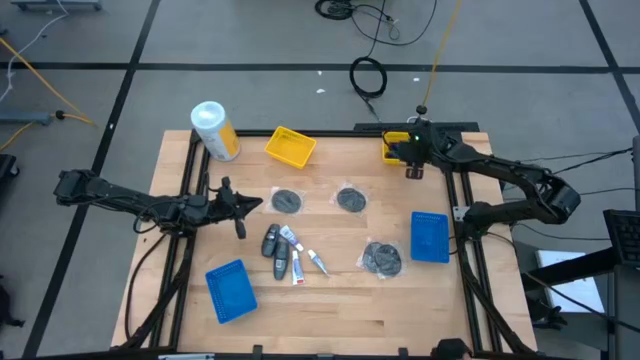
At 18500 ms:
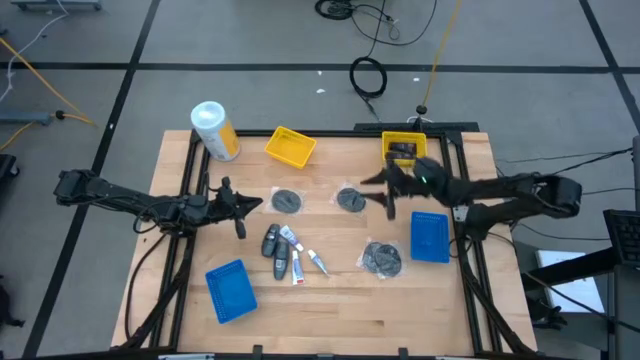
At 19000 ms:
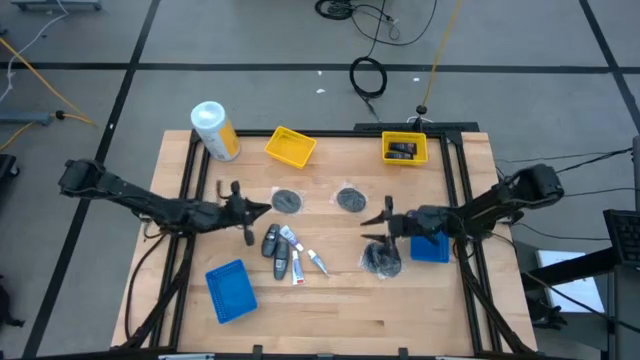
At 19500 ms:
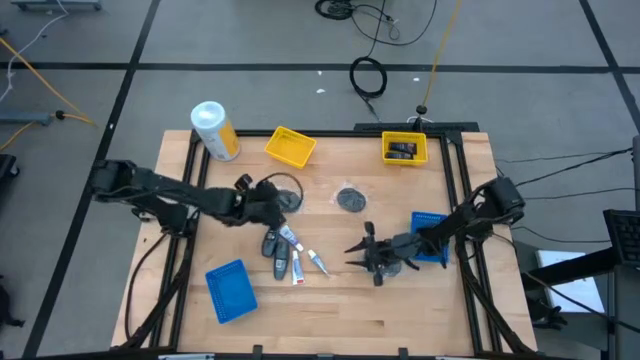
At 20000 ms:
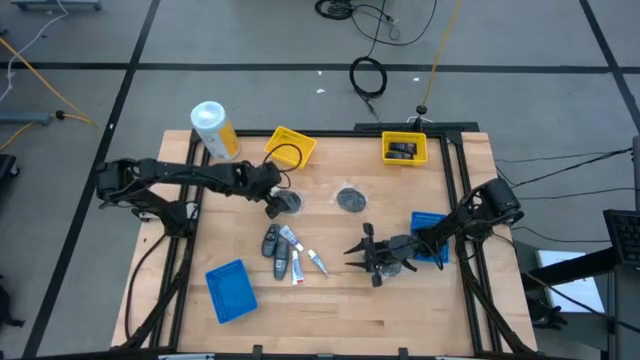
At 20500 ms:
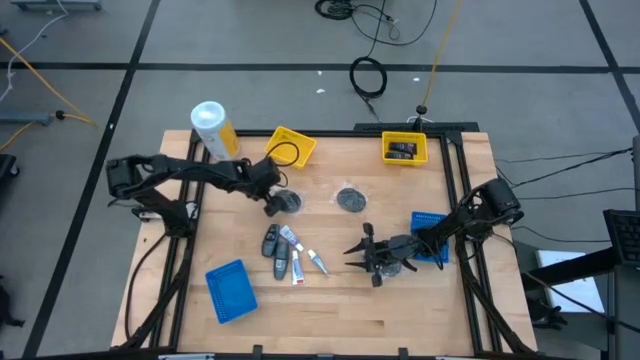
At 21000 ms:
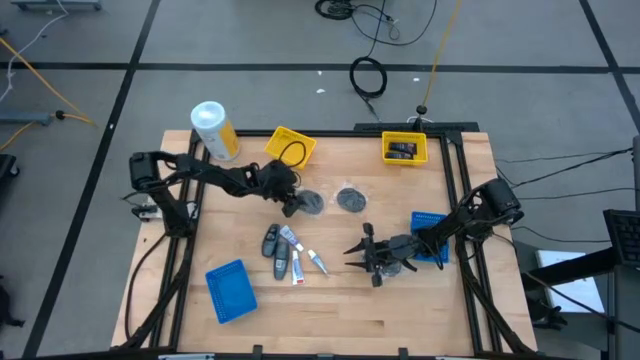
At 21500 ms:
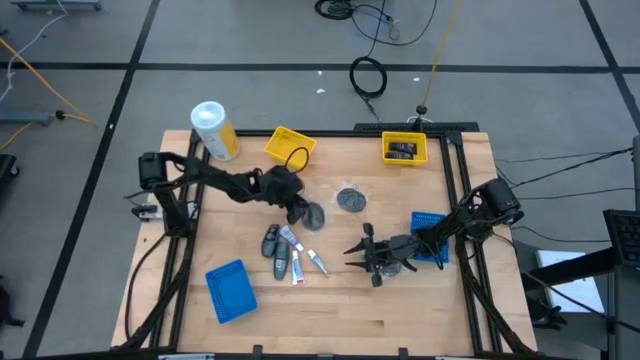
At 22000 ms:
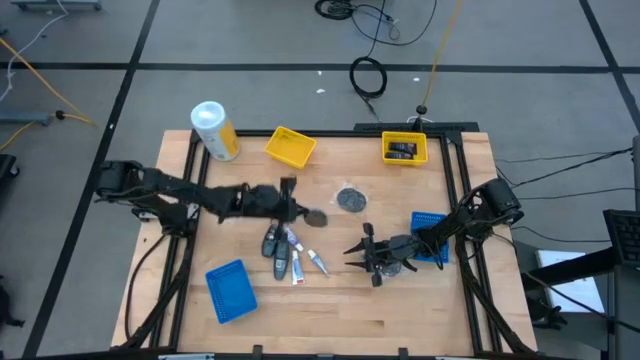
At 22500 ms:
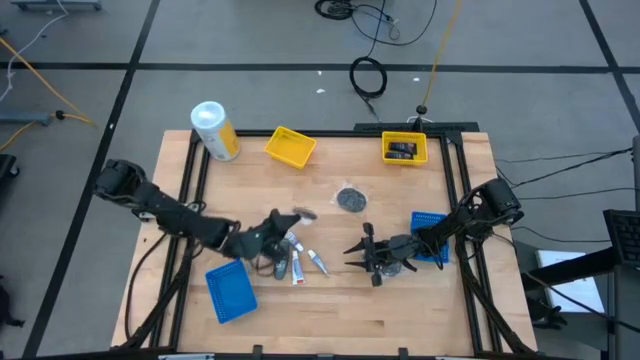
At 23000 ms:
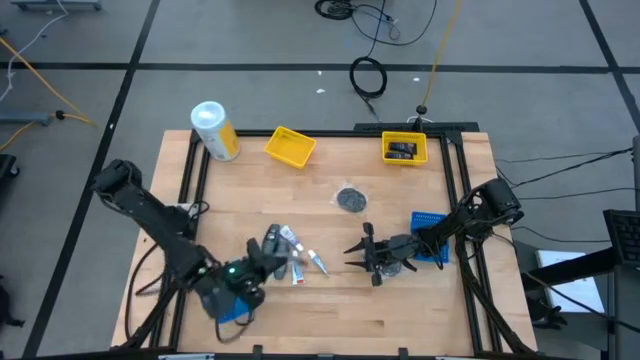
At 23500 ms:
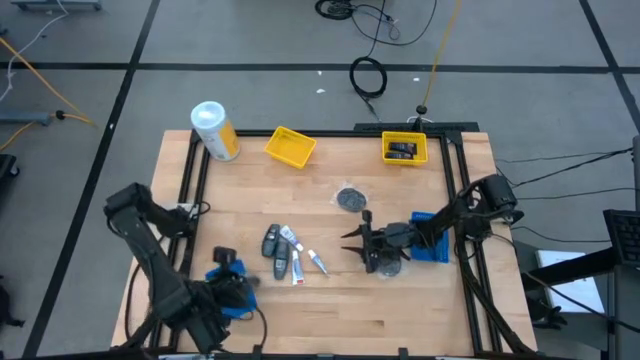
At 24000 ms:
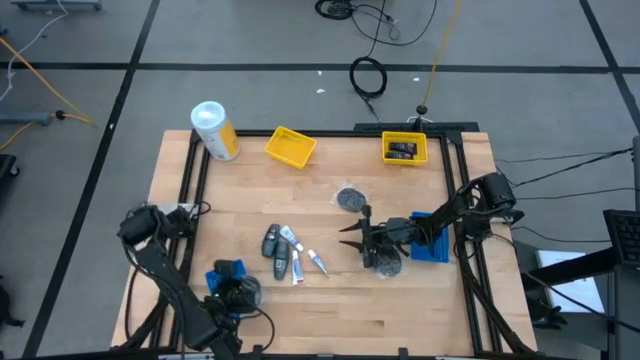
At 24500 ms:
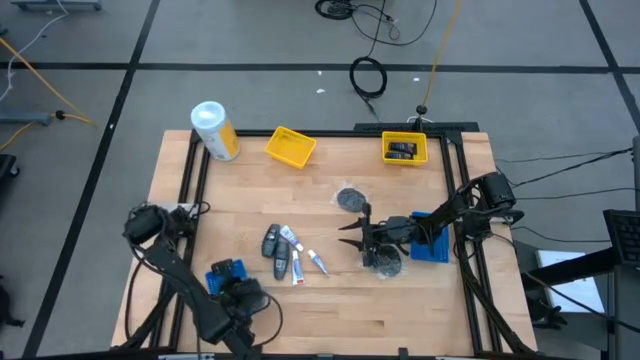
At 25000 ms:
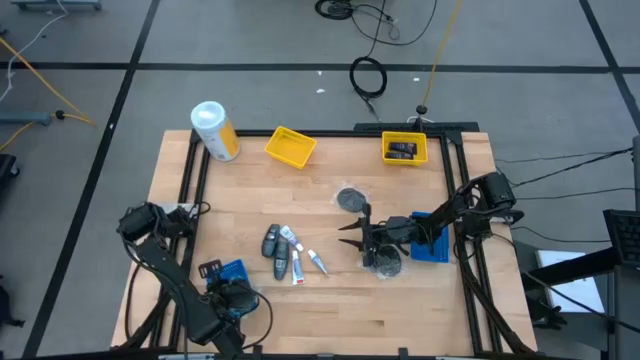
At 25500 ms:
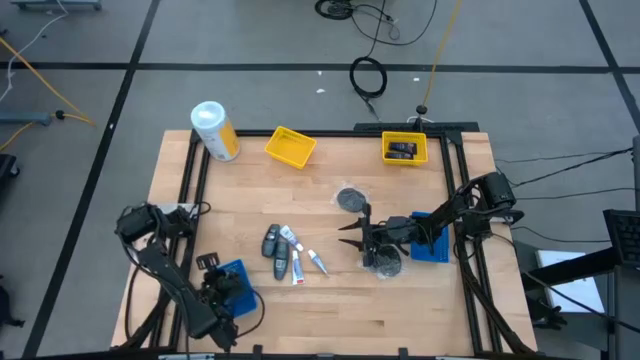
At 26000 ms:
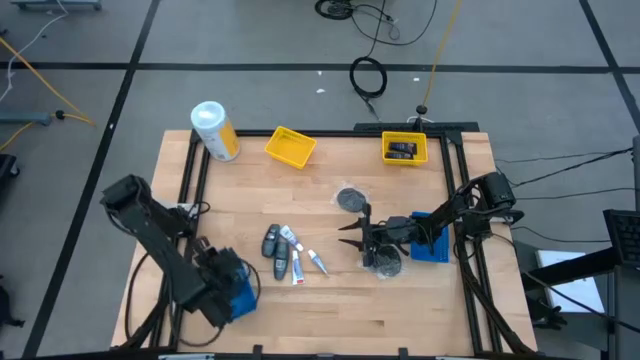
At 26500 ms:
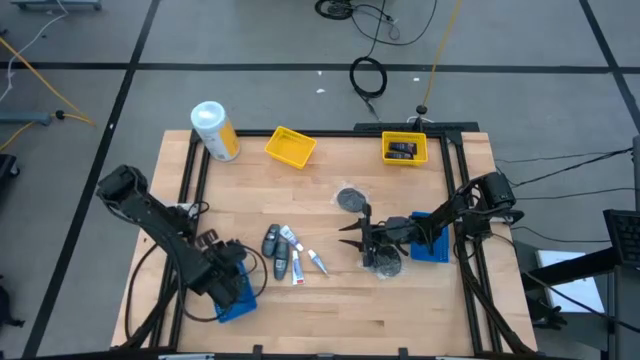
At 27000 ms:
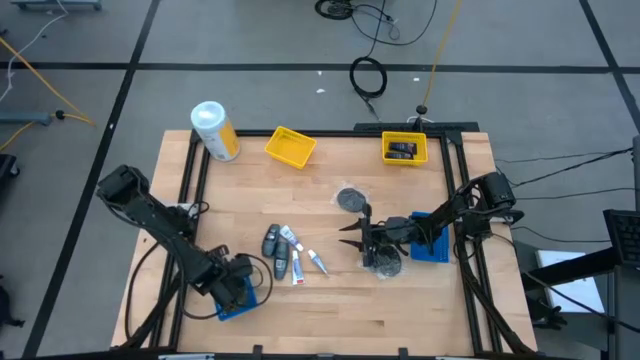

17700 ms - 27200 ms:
Task: Pick & Place Travel size toiletries
Put the black hairbrush into the left blue bin

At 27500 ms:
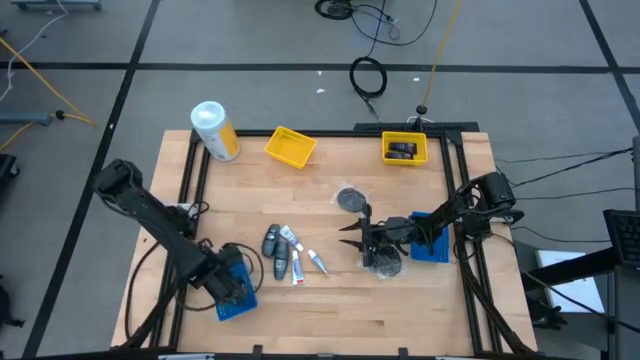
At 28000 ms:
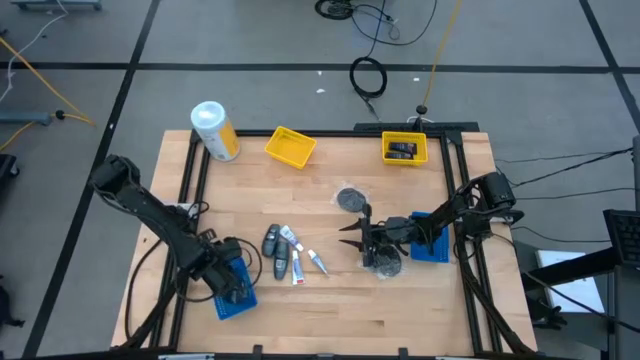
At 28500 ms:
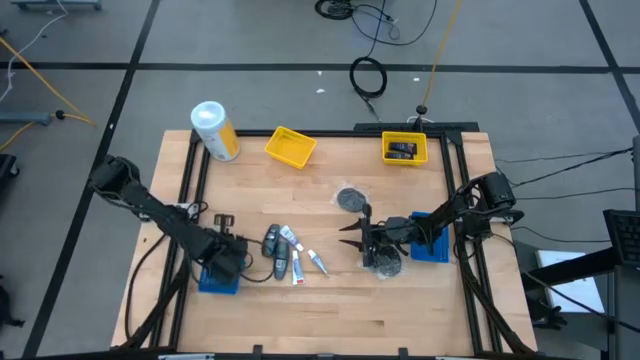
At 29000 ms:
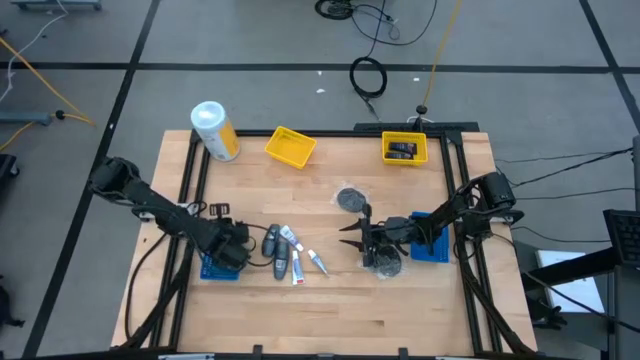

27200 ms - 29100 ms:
Adjust the left blue bin

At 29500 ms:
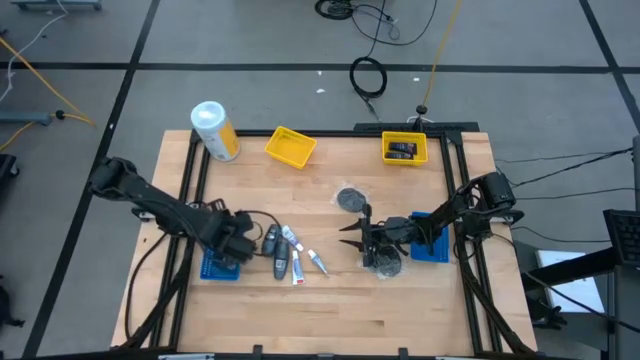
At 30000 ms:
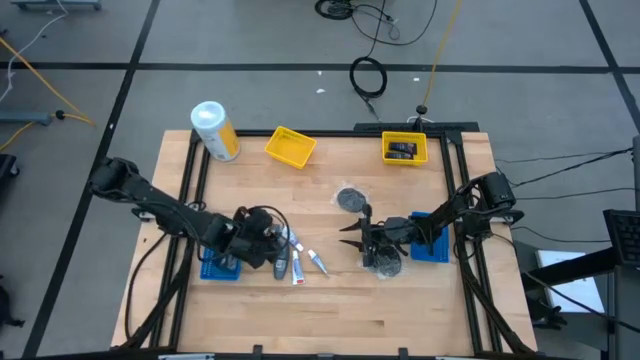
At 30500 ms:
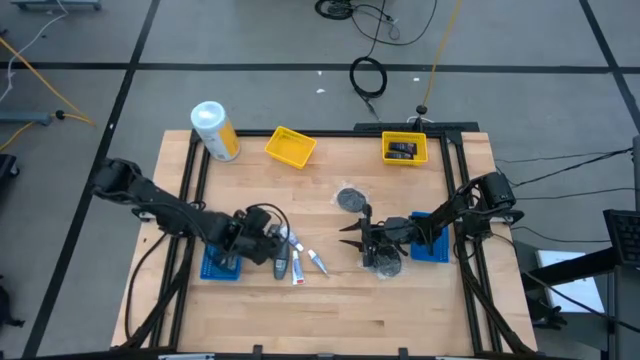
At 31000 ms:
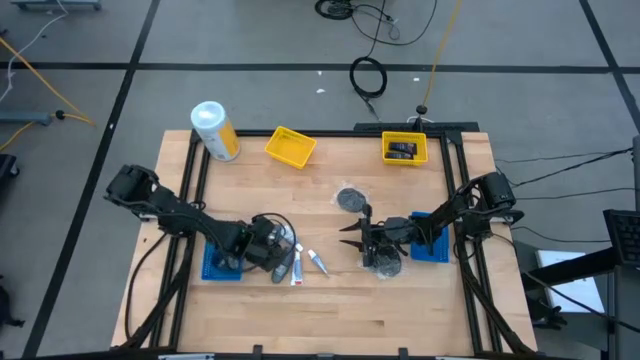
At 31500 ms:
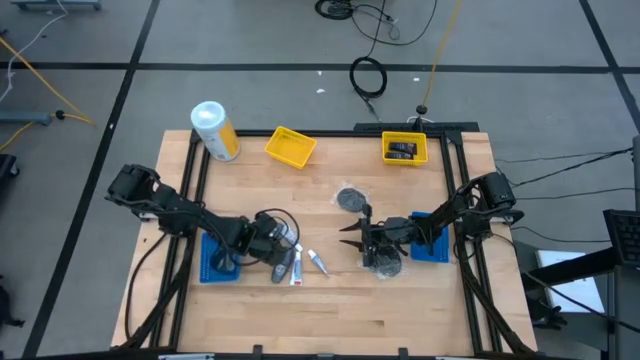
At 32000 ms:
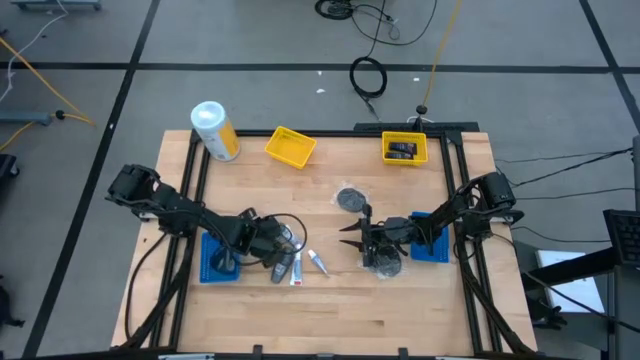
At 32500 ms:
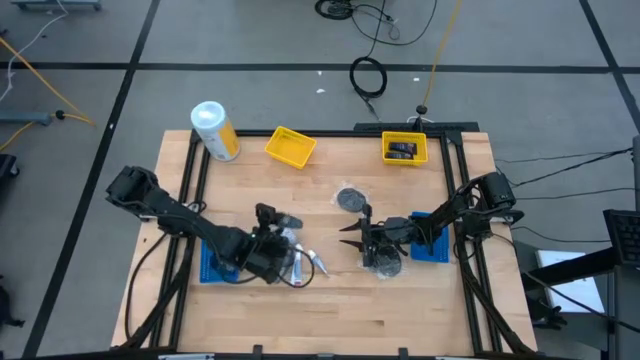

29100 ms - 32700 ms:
Put the gray deodorant into the left yellow bin

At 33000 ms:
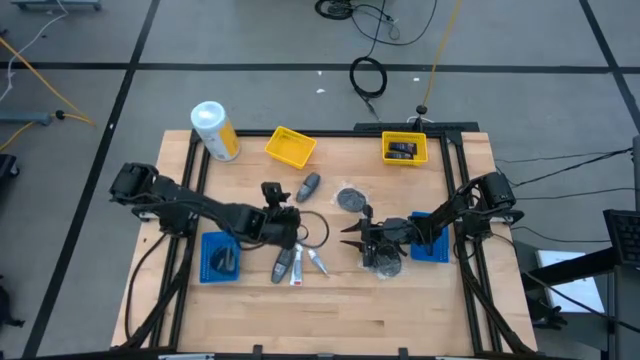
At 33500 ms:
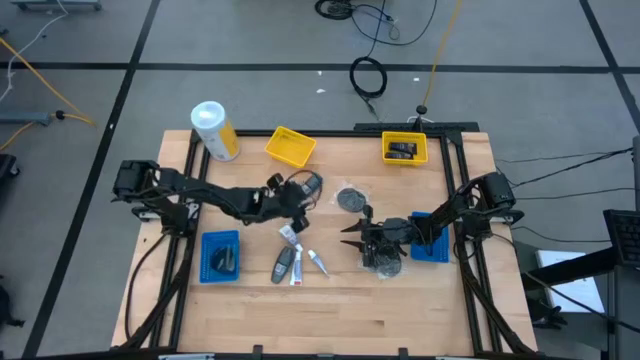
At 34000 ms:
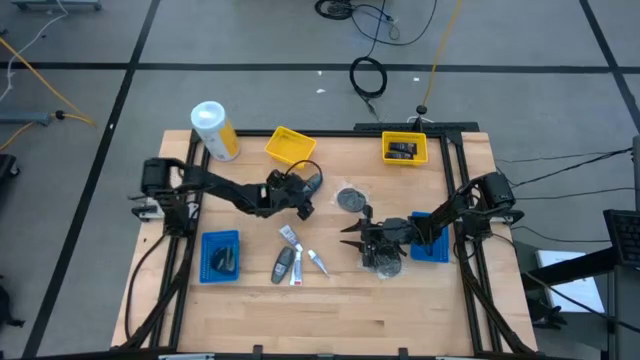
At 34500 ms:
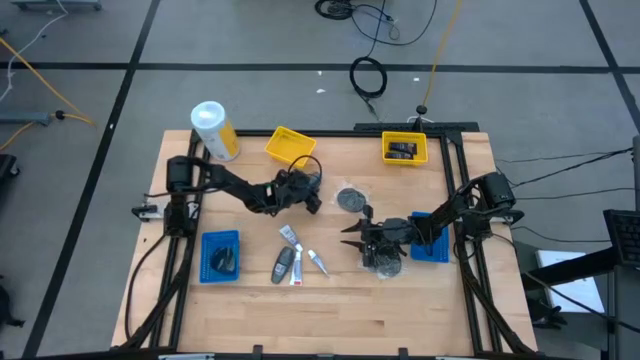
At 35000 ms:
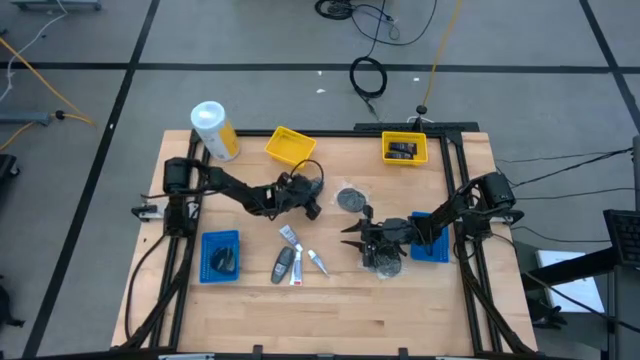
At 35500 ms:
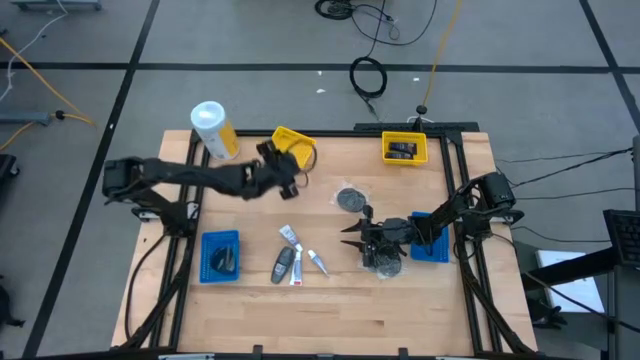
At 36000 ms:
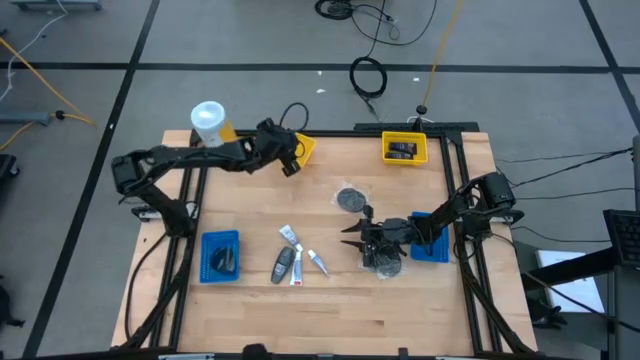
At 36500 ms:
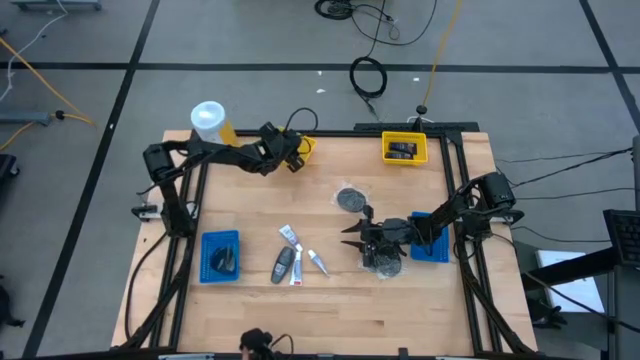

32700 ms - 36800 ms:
Put the gray deodorant into the left yellow bin

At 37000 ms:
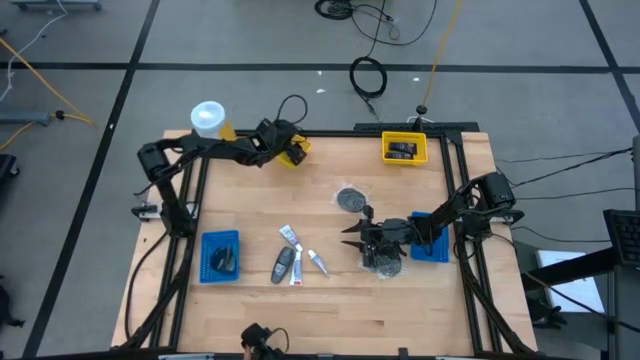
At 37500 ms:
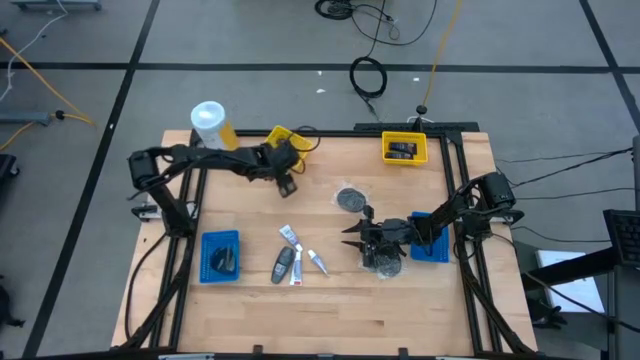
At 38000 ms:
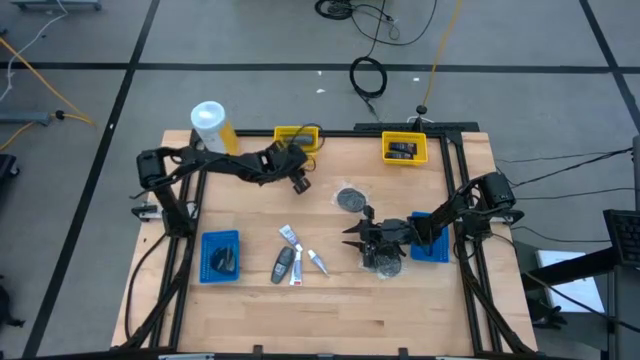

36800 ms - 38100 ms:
Adjust the left yellow bin

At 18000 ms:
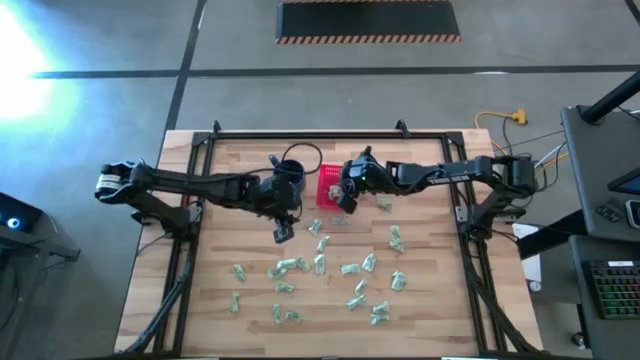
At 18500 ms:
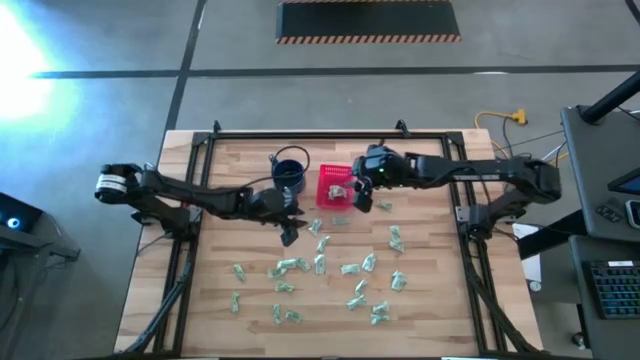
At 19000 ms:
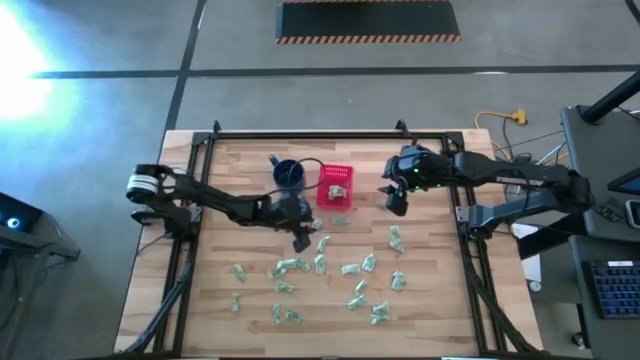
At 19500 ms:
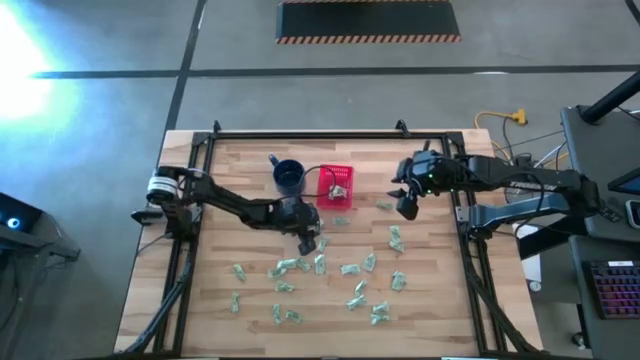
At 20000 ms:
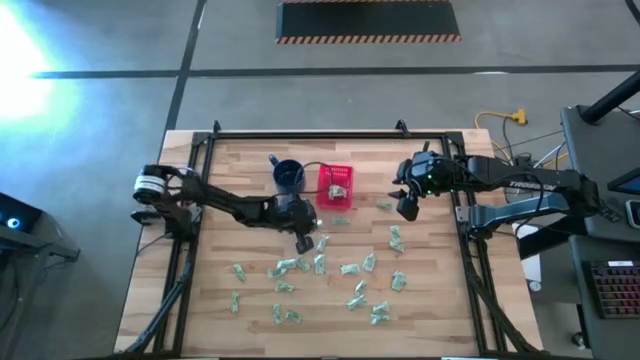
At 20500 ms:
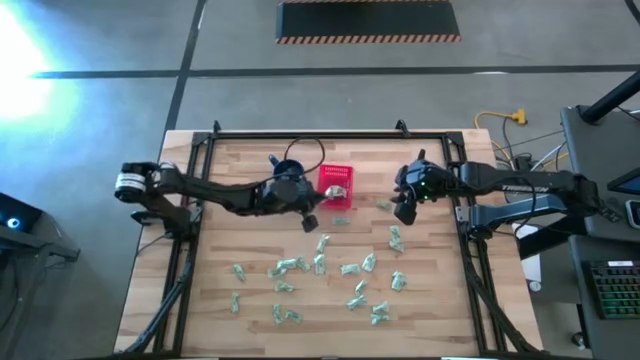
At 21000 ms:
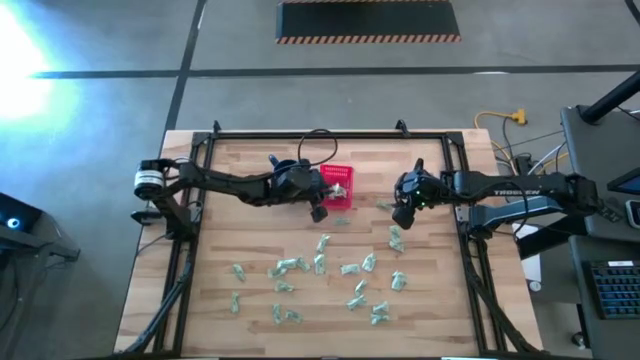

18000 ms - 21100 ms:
Task: Pick and place Stevia / Truvia into bins
Put the stevia packet into the red basket
